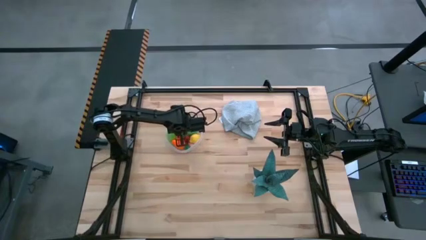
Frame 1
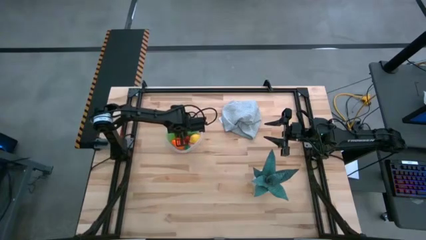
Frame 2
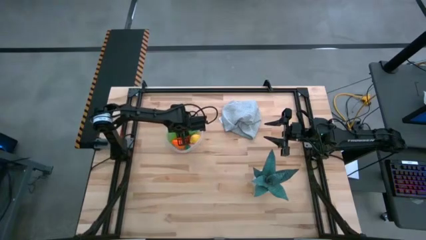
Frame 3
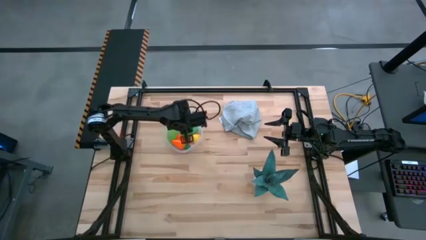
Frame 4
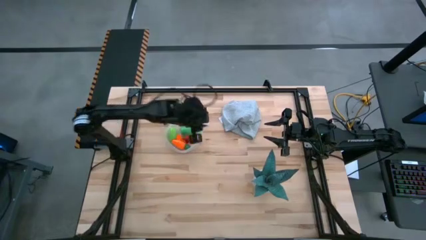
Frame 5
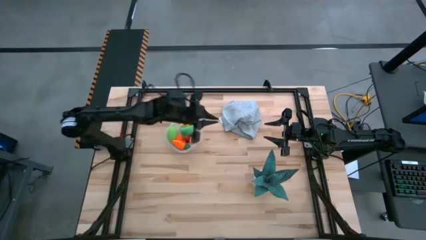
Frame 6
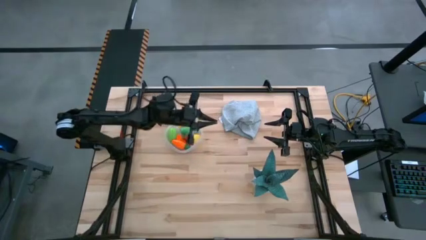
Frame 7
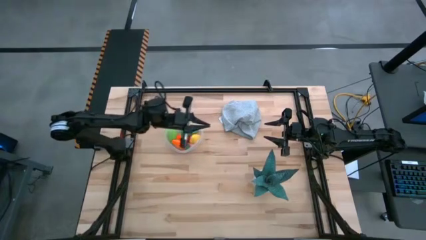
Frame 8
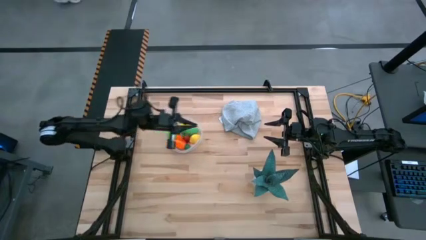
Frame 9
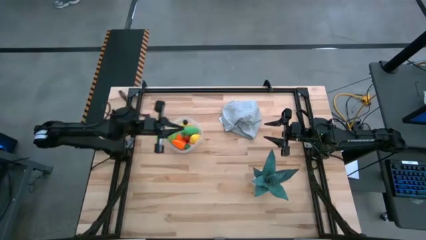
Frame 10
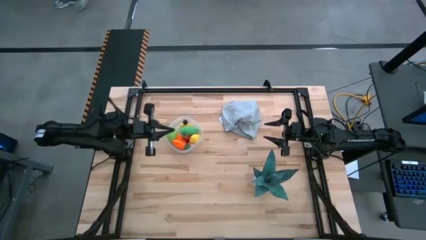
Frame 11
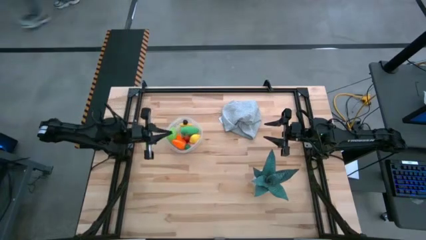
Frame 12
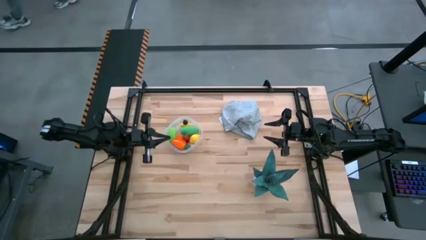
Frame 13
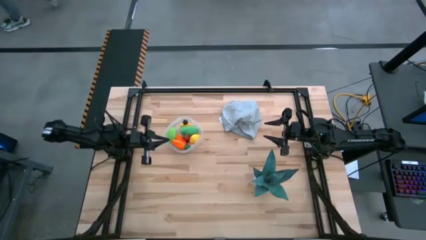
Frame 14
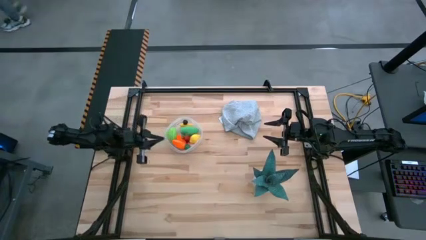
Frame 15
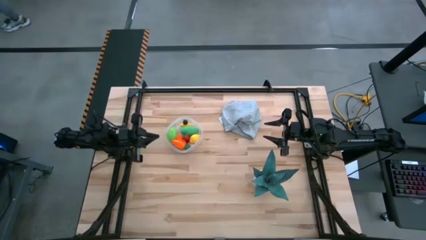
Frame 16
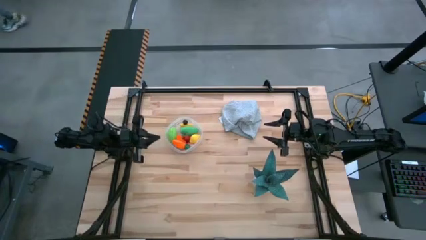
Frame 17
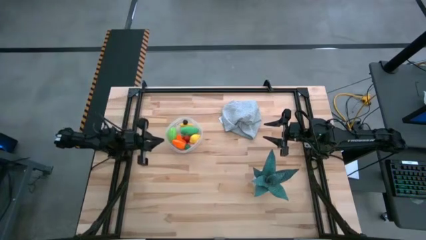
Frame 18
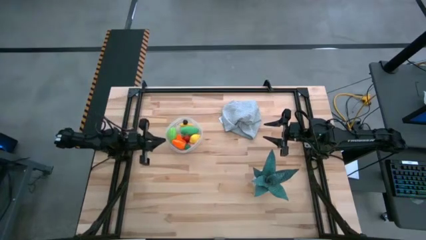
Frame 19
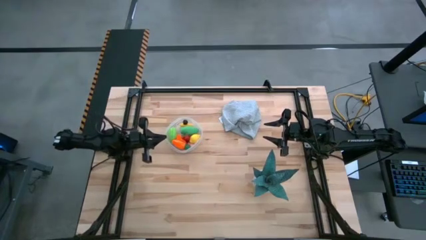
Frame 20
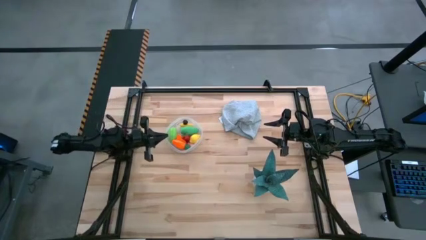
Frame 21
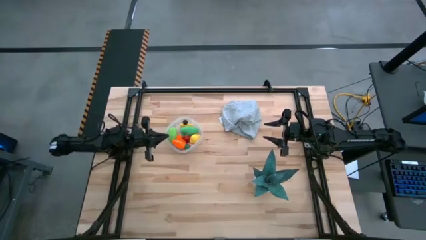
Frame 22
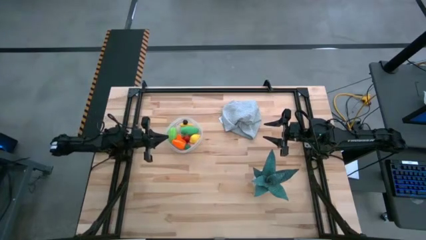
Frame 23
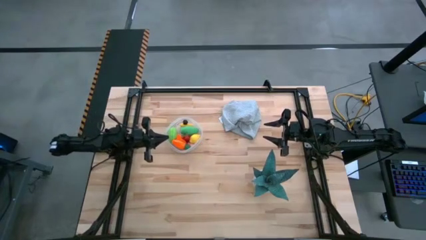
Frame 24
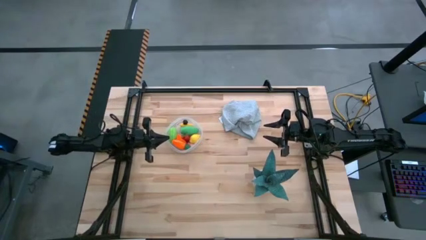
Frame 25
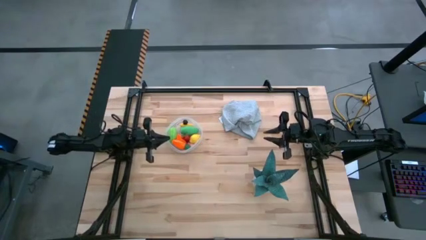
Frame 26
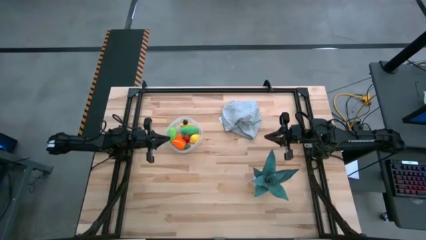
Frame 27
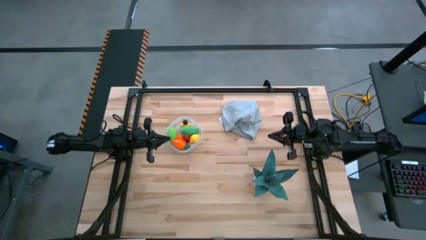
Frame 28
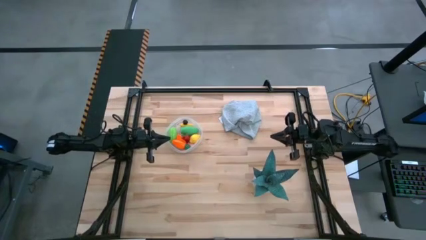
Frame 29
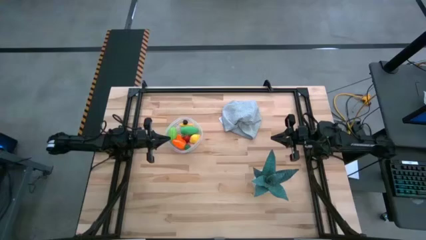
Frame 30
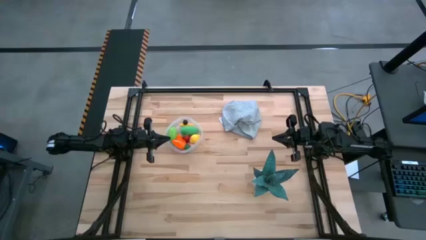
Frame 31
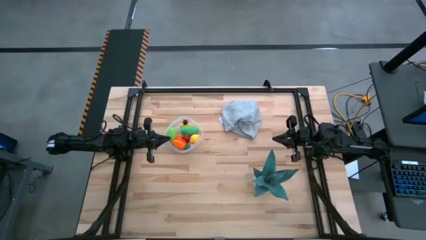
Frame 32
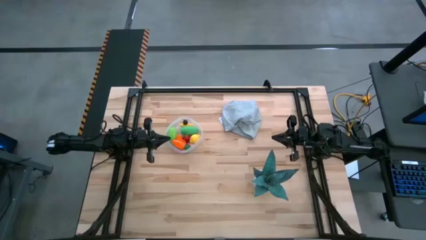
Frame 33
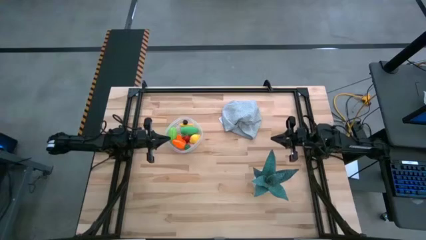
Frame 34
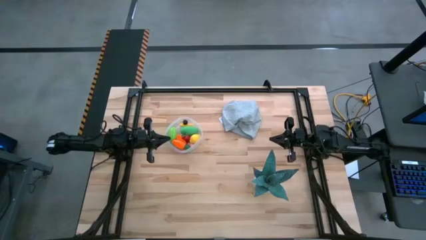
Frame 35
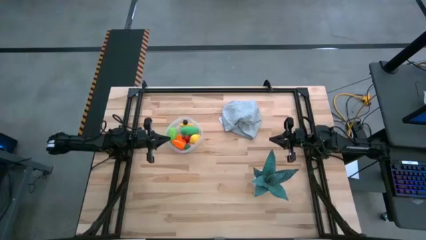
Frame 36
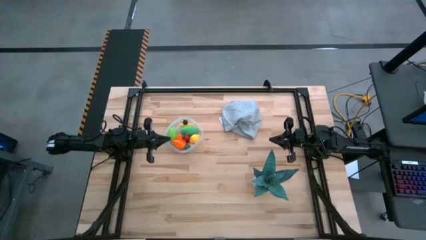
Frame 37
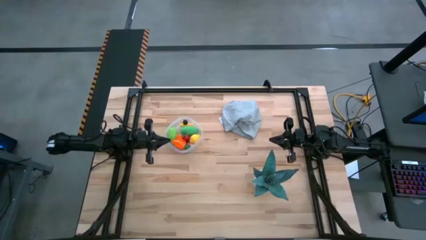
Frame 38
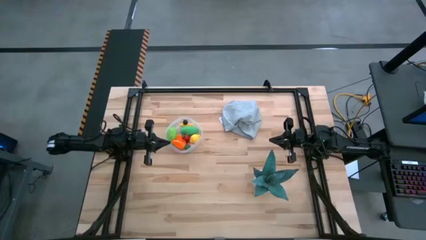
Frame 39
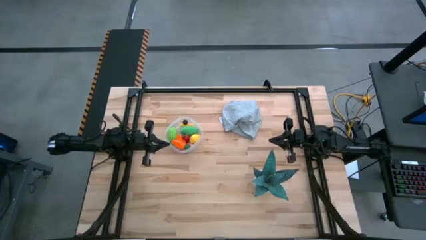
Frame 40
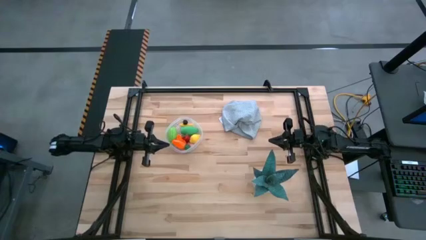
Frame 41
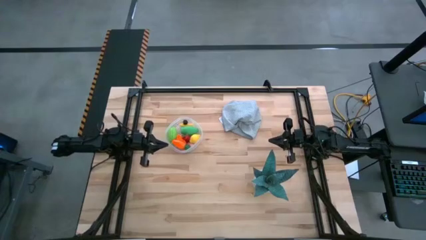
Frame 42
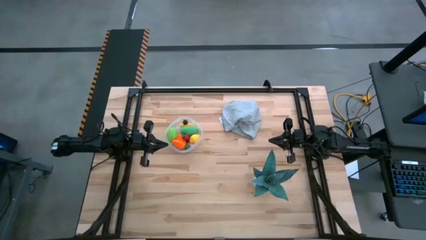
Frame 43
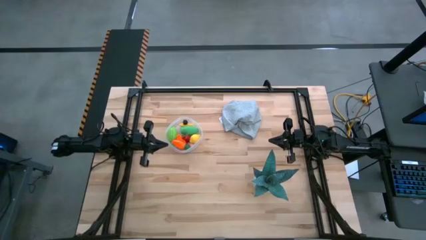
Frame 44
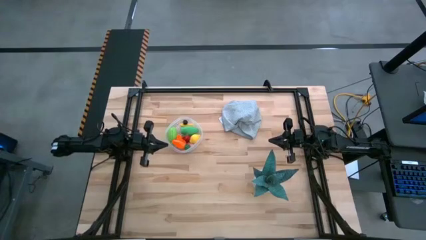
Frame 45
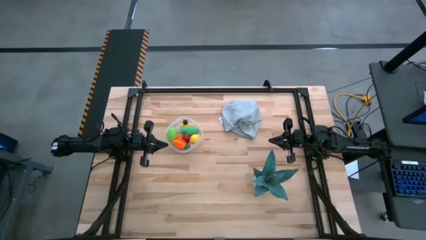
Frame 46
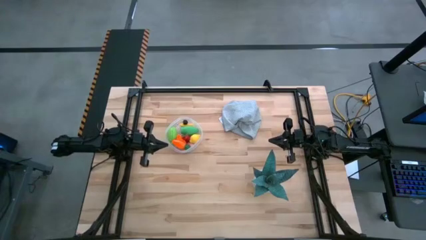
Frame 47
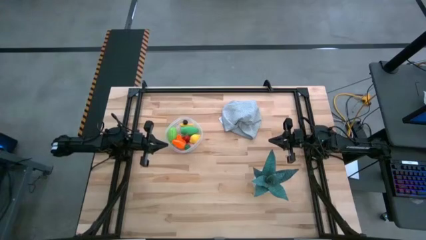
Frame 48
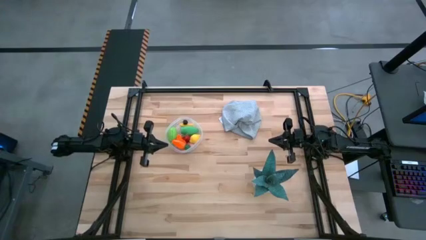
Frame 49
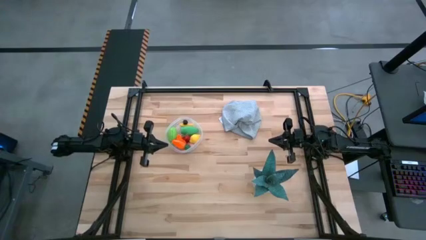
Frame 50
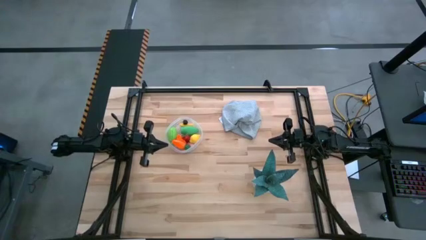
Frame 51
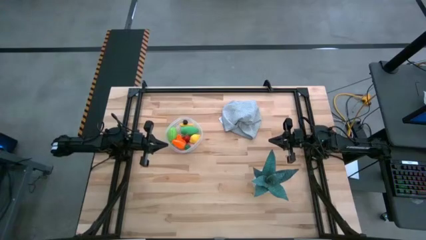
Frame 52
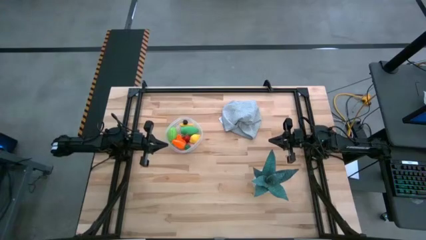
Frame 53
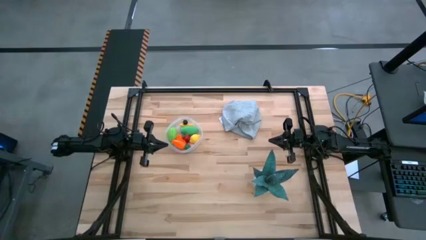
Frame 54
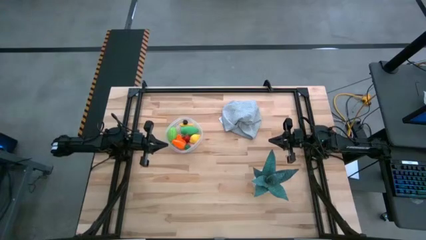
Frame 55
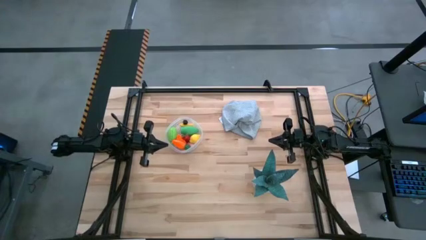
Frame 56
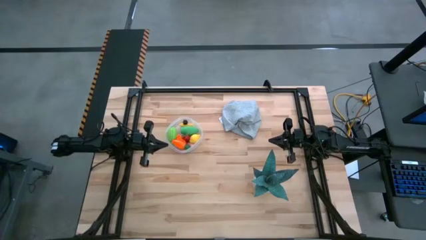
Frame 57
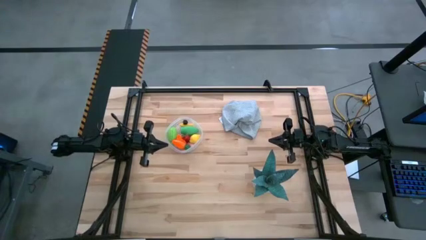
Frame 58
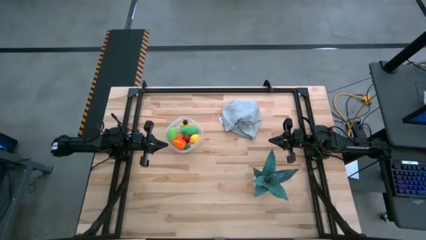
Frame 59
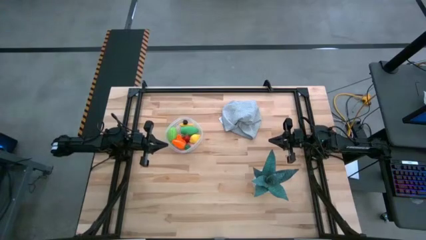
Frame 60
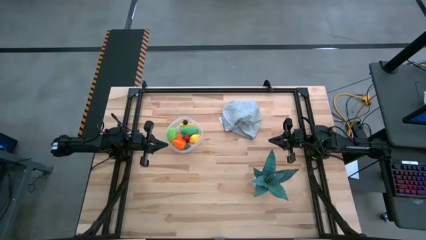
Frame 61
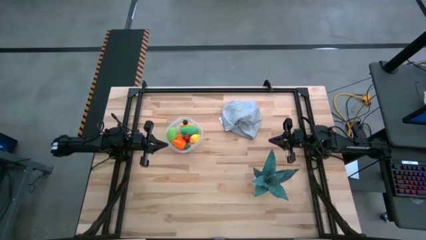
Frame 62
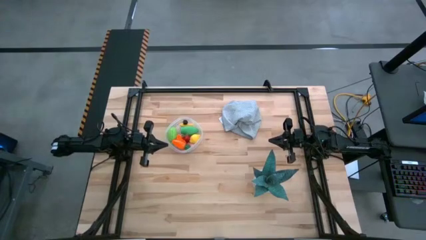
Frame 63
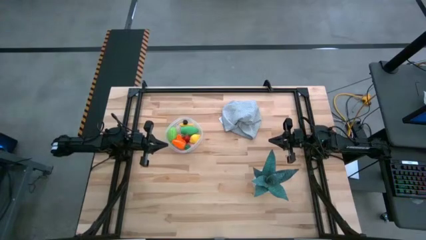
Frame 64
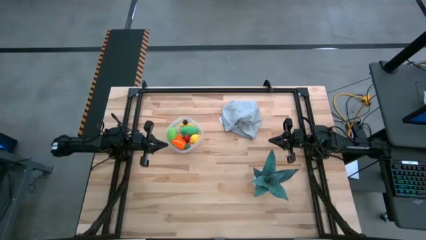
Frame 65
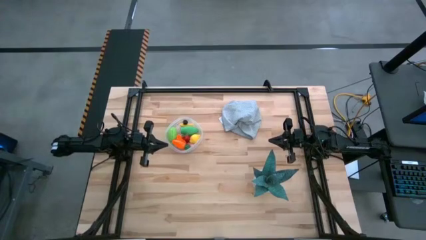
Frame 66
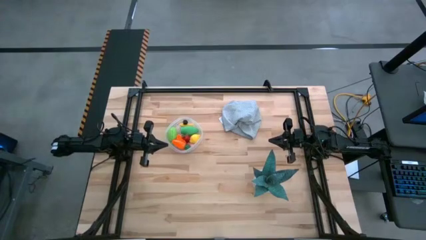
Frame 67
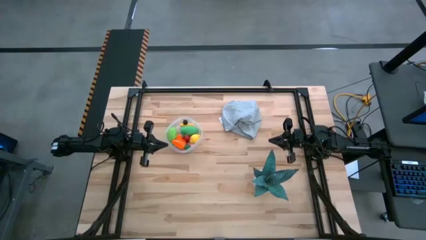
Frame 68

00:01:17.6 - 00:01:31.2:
Task: Pick and placing Produce into tupperware
Return to Home Position
